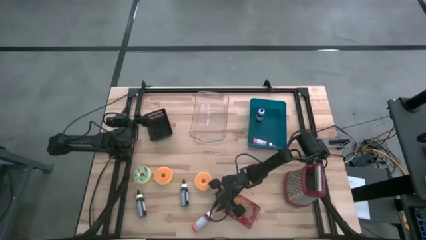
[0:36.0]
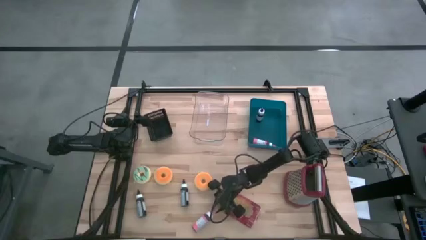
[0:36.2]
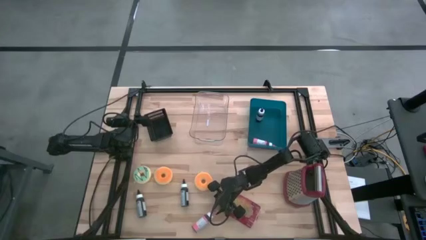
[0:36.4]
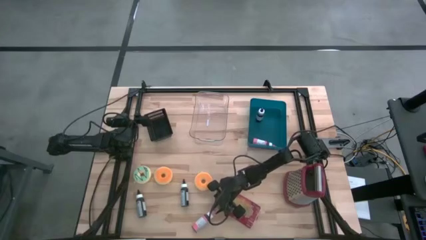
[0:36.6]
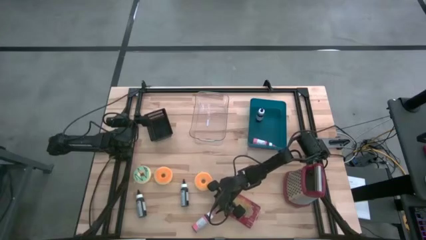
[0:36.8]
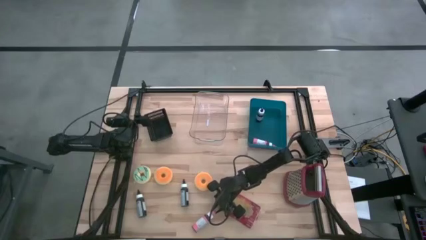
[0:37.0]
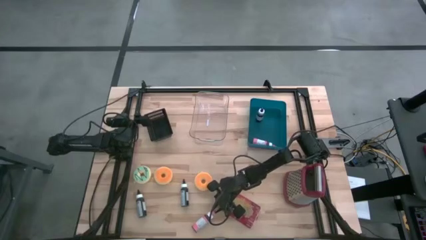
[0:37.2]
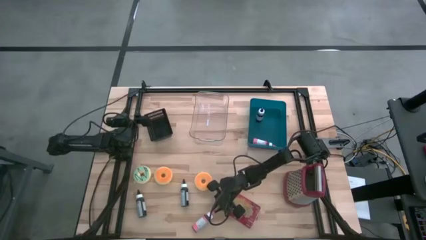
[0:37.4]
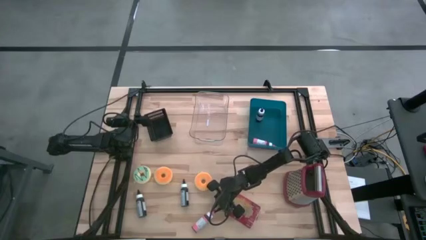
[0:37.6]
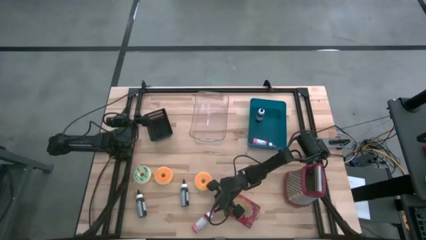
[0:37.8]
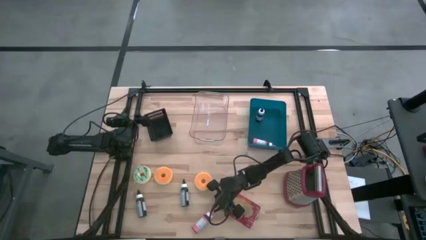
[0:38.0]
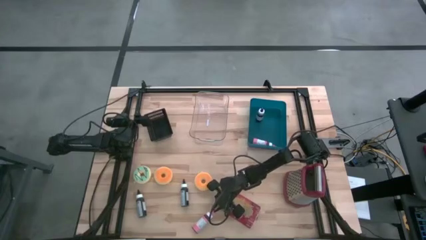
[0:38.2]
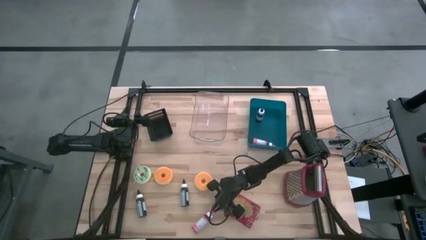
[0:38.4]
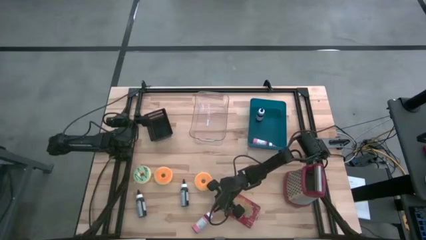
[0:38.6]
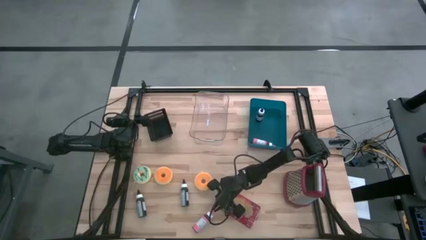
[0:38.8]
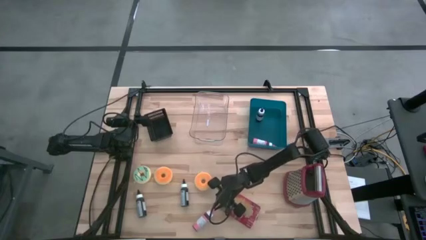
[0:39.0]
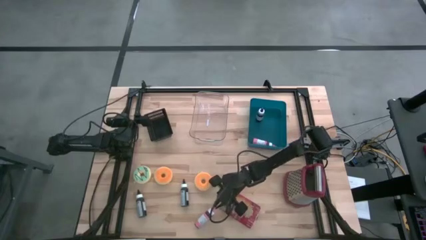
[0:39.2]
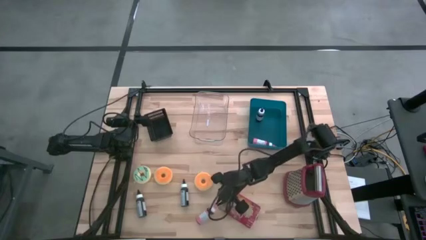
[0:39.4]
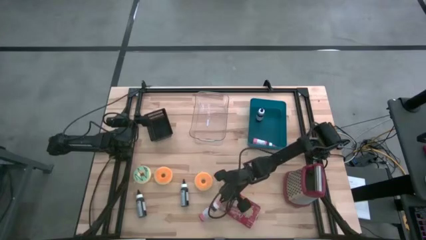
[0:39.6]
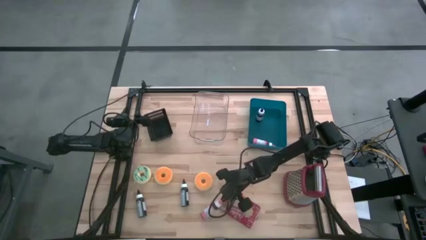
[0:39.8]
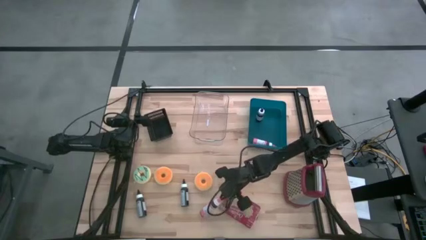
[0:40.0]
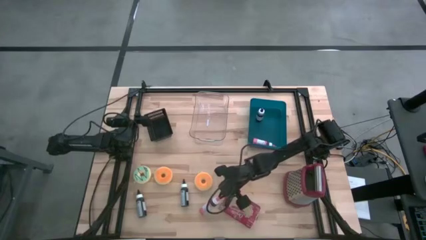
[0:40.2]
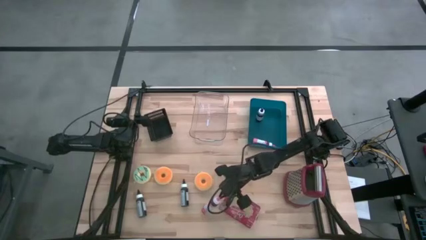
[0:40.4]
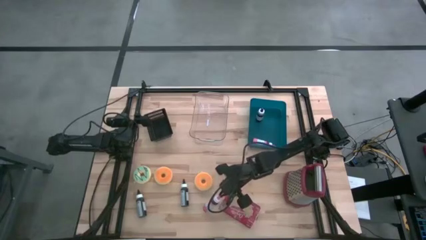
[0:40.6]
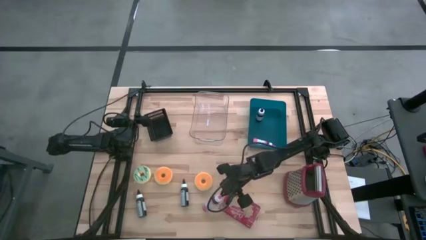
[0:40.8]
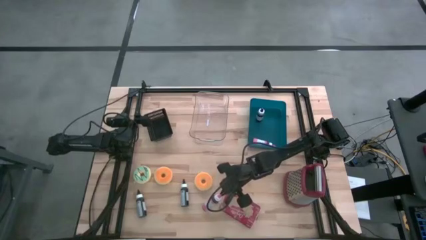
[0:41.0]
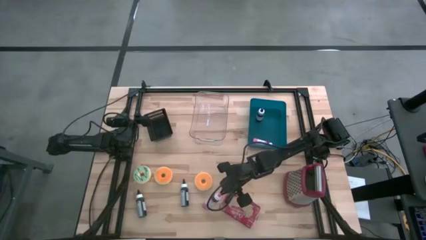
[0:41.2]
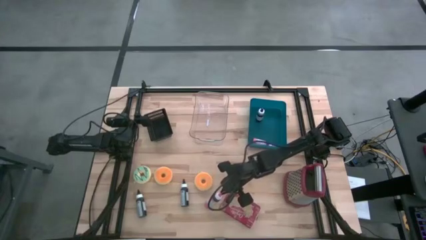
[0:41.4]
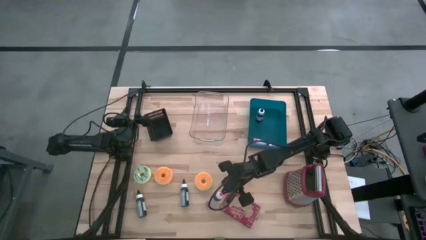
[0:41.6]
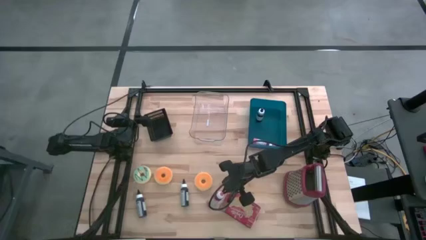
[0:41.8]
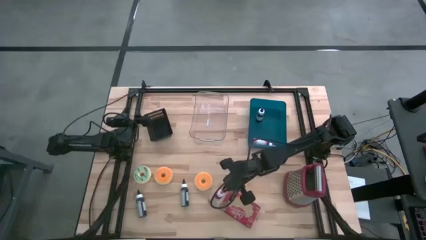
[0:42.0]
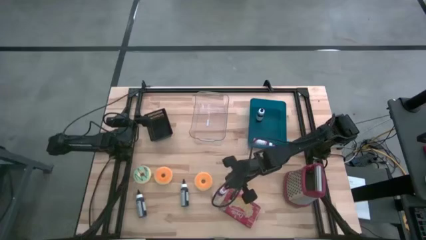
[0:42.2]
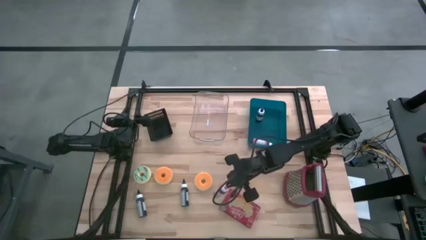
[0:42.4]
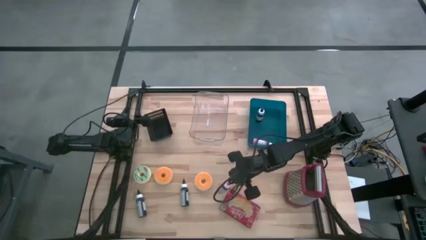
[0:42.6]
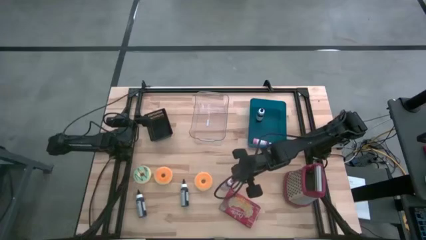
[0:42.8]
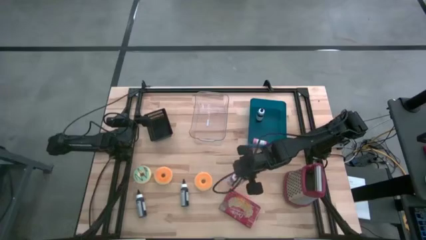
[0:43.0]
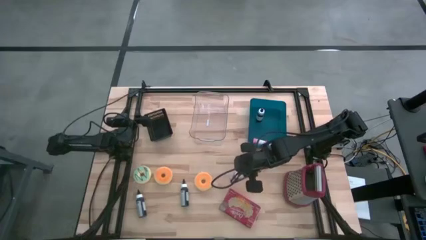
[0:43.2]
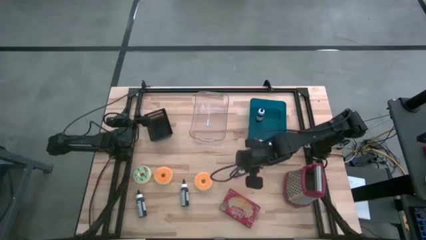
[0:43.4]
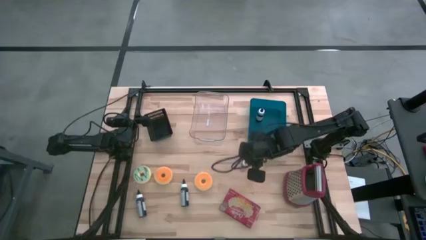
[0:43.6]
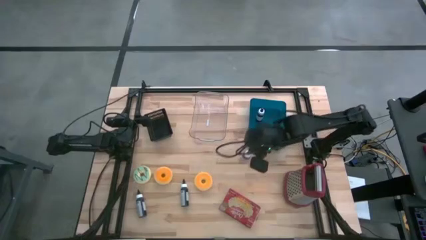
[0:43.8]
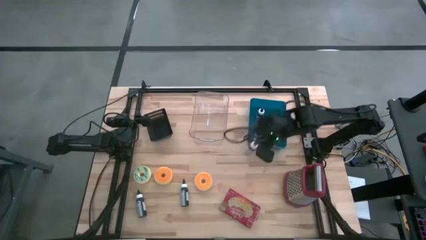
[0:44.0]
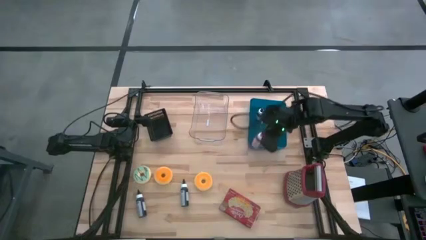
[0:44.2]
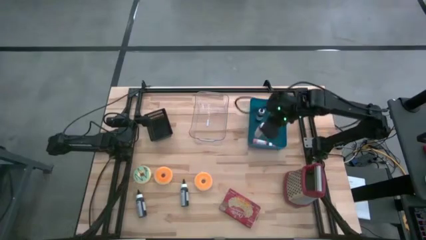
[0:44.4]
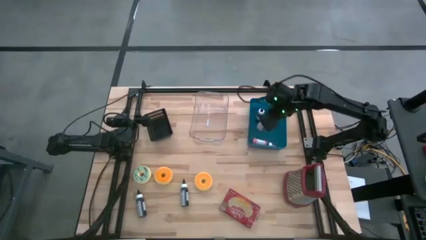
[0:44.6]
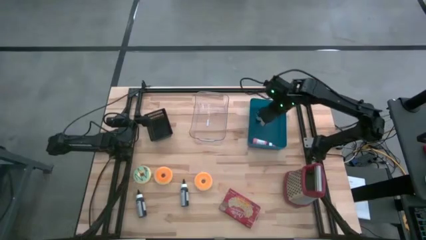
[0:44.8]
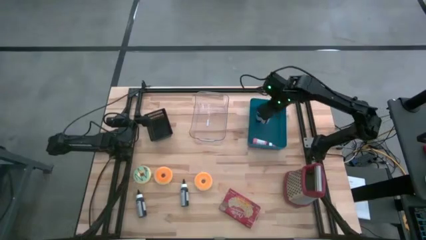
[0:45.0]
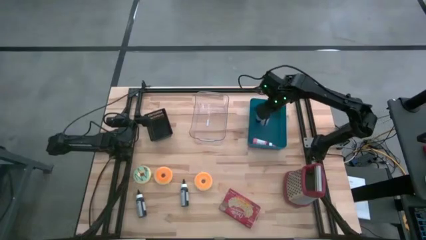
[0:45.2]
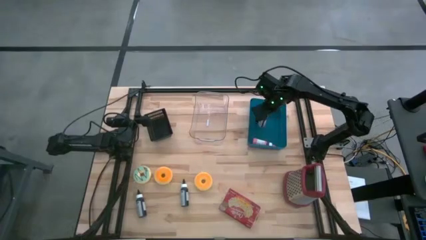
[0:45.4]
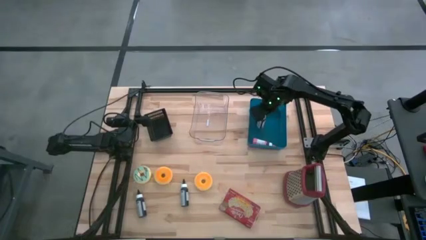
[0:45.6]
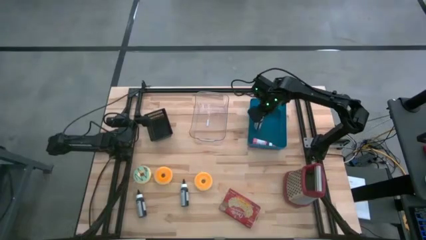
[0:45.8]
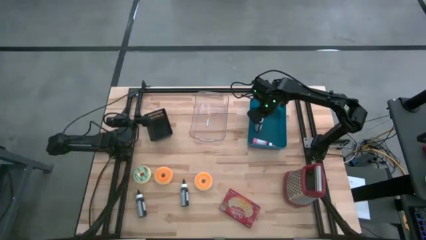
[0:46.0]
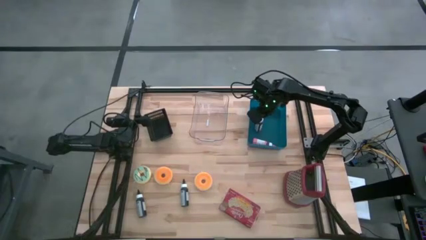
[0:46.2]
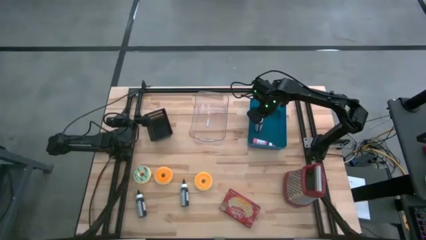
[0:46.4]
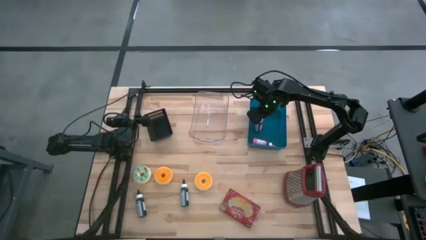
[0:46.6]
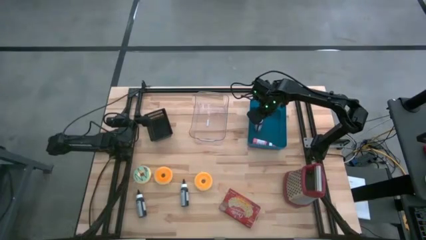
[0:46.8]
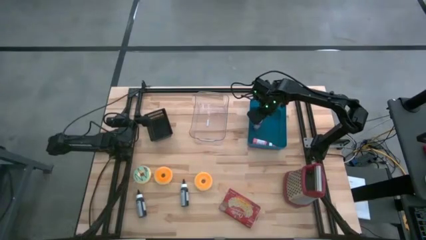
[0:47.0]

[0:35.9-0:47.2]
Task: Pick & Place Food Item
Put the pink food coloring bottle into the blue bin
